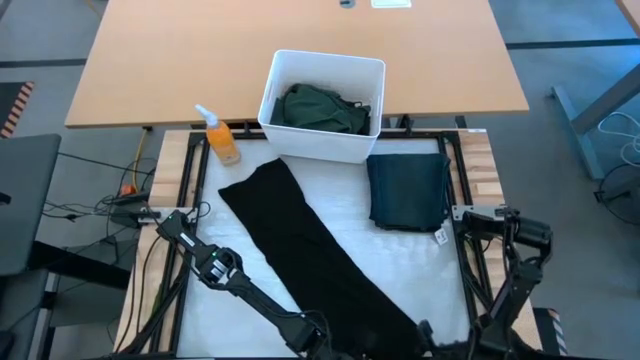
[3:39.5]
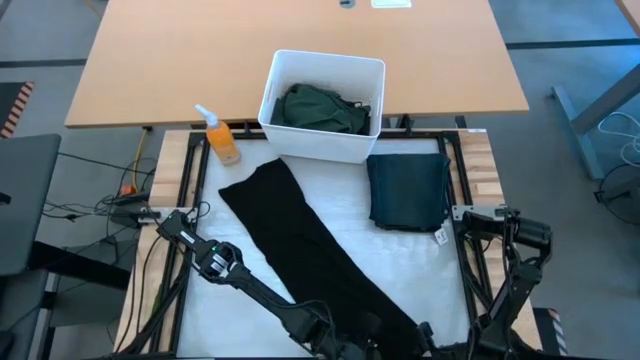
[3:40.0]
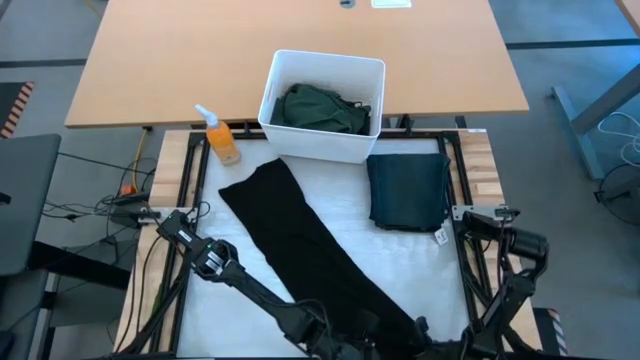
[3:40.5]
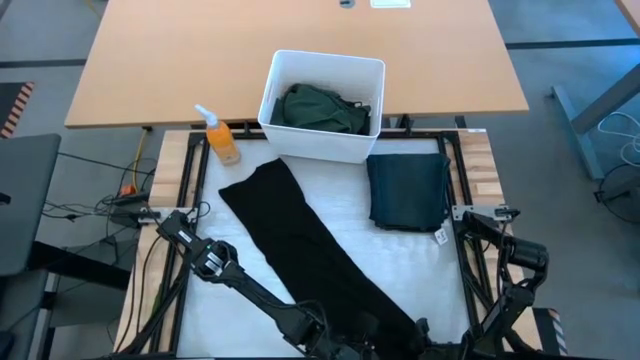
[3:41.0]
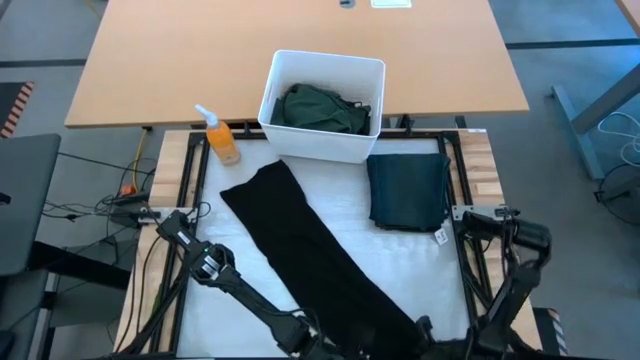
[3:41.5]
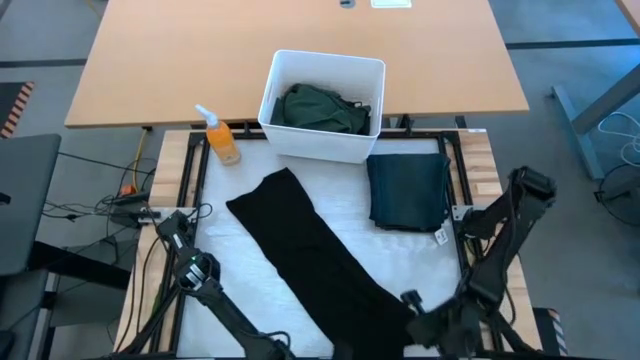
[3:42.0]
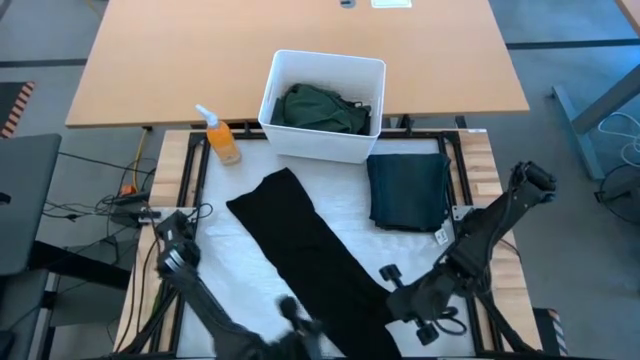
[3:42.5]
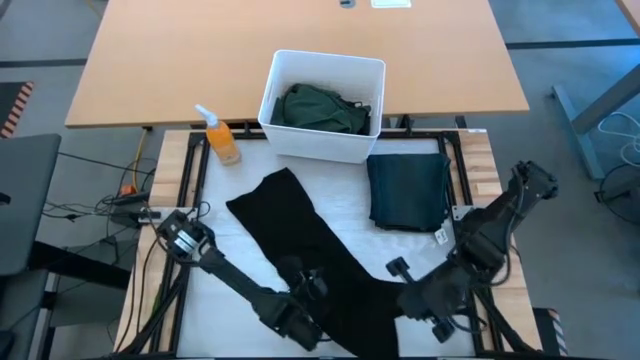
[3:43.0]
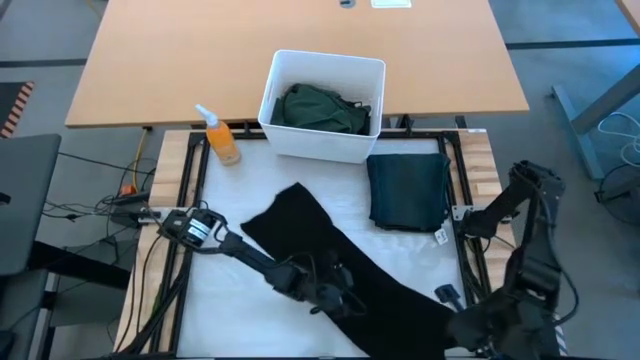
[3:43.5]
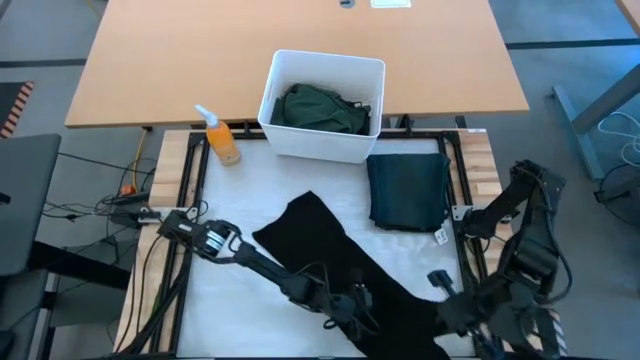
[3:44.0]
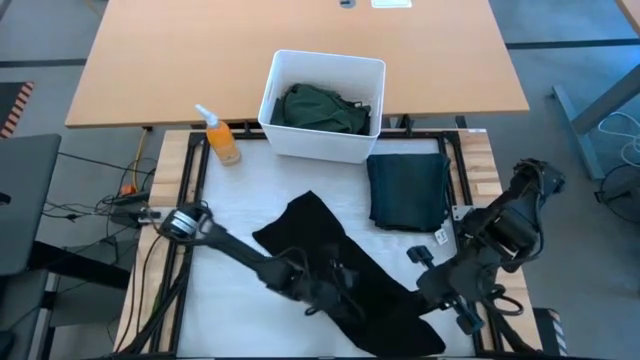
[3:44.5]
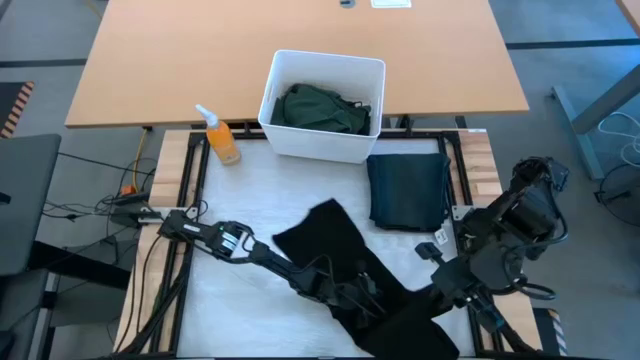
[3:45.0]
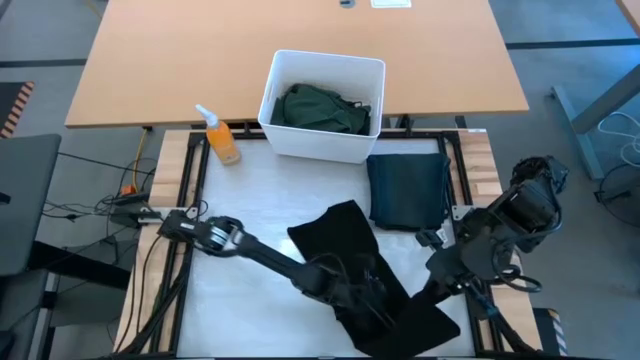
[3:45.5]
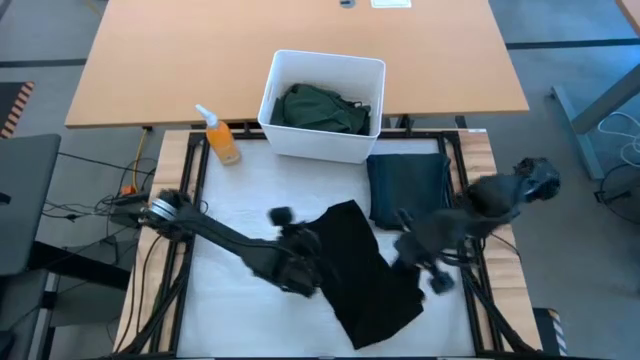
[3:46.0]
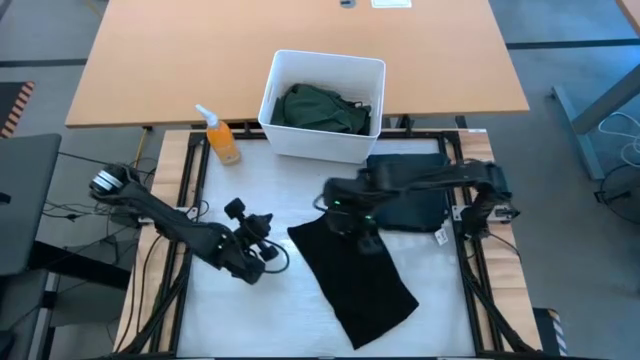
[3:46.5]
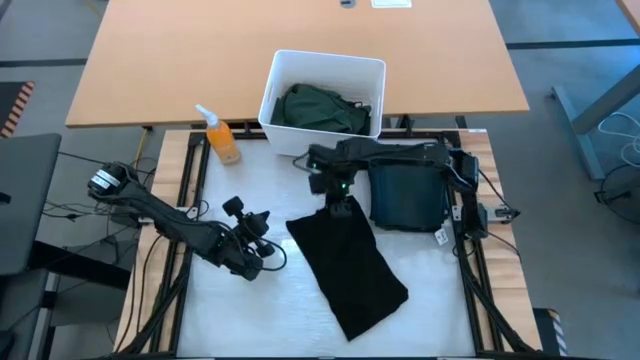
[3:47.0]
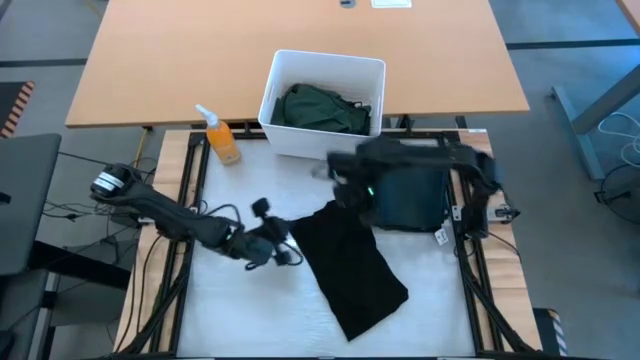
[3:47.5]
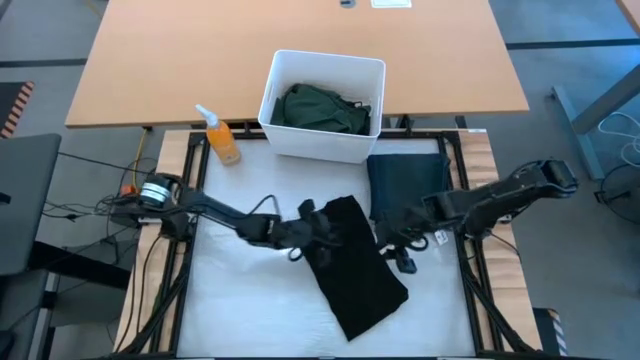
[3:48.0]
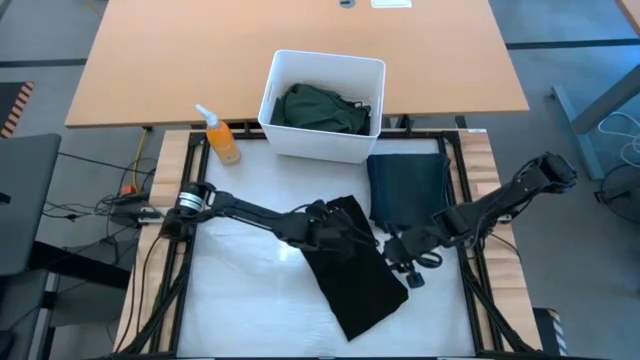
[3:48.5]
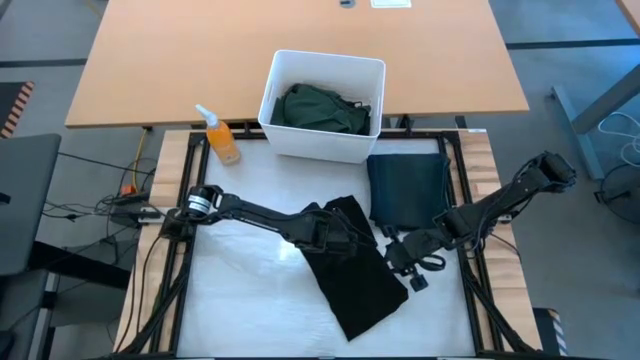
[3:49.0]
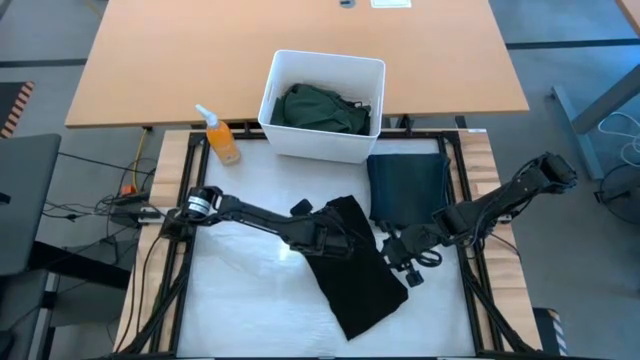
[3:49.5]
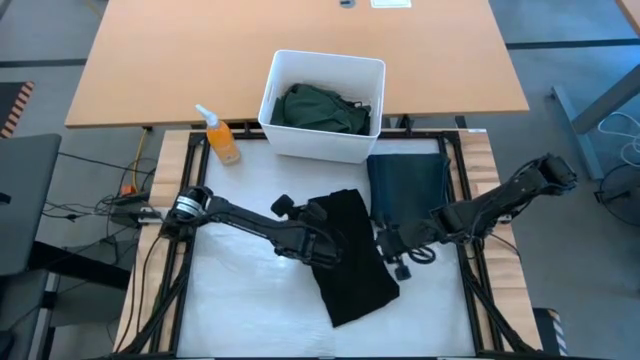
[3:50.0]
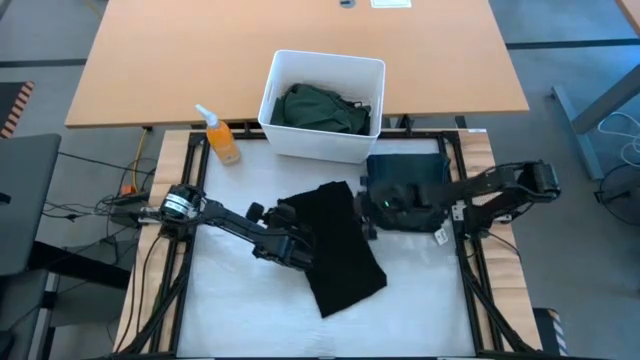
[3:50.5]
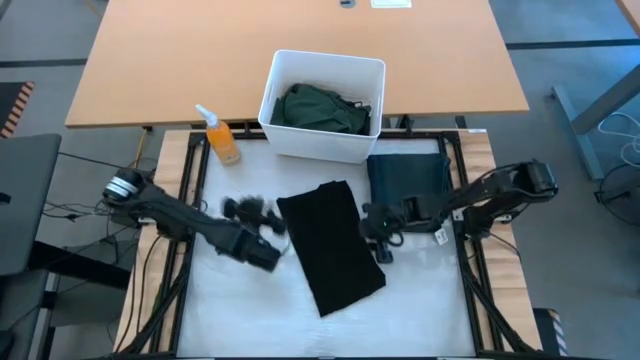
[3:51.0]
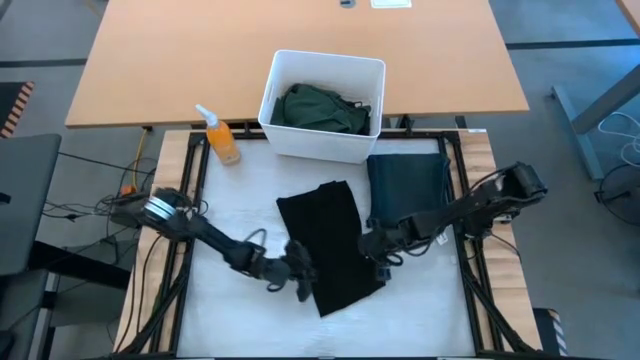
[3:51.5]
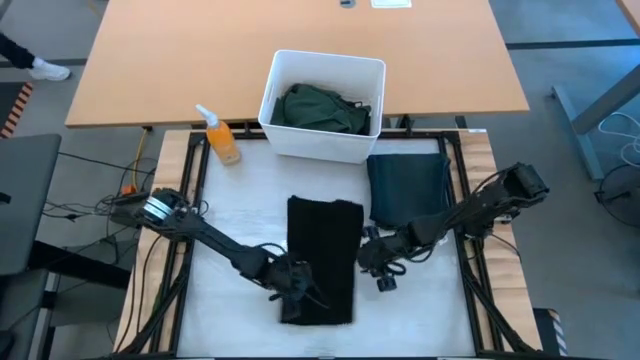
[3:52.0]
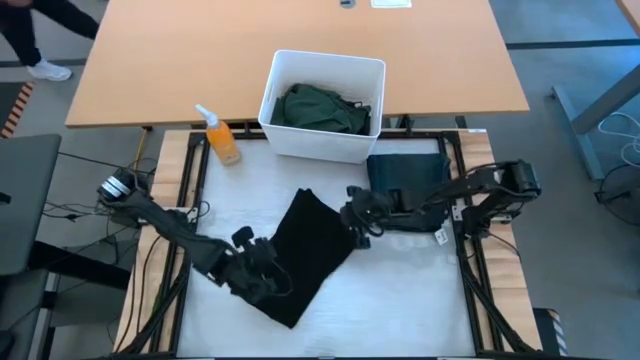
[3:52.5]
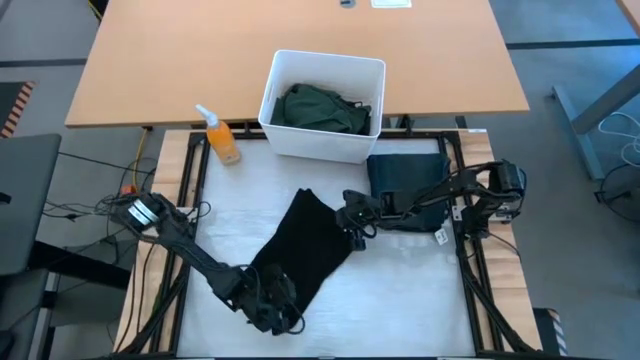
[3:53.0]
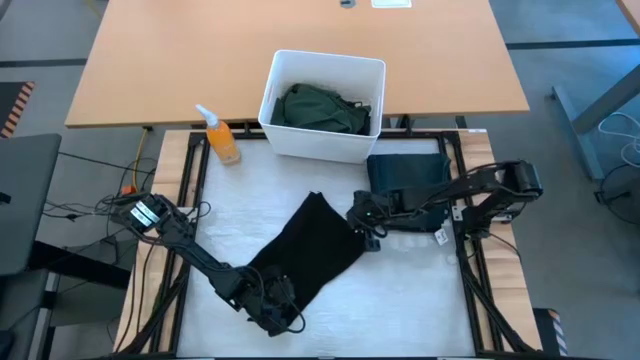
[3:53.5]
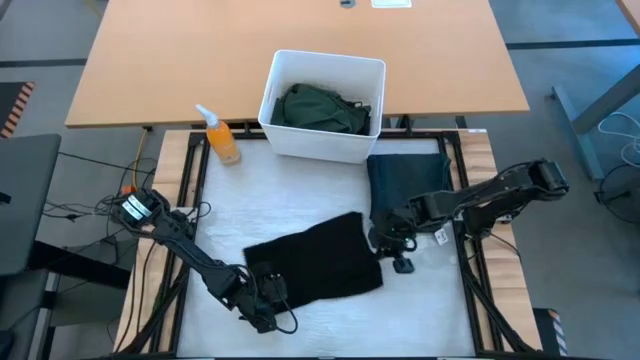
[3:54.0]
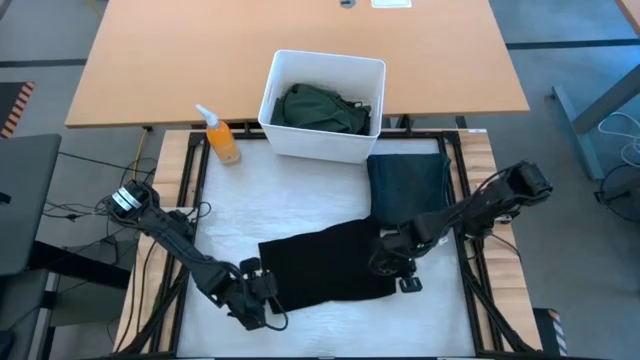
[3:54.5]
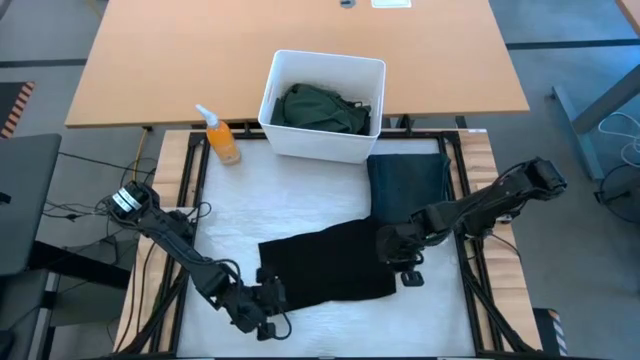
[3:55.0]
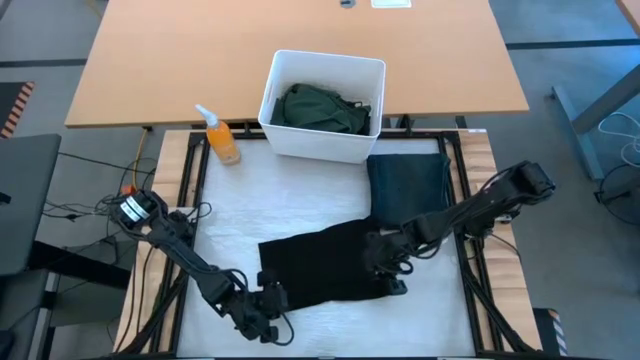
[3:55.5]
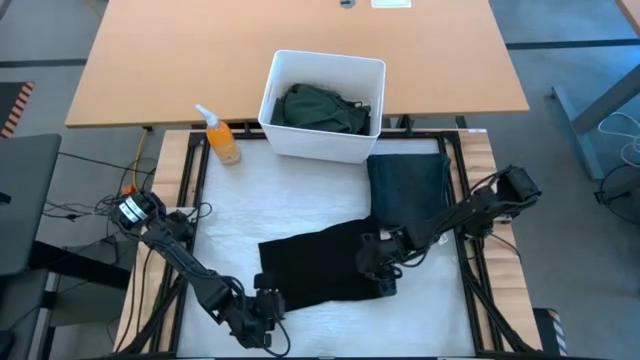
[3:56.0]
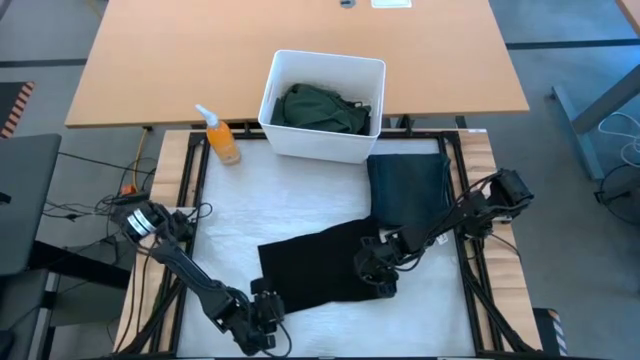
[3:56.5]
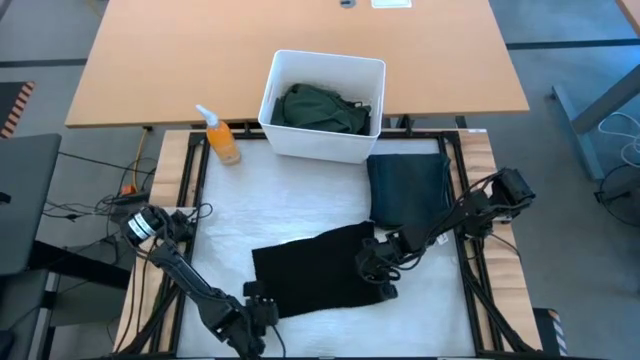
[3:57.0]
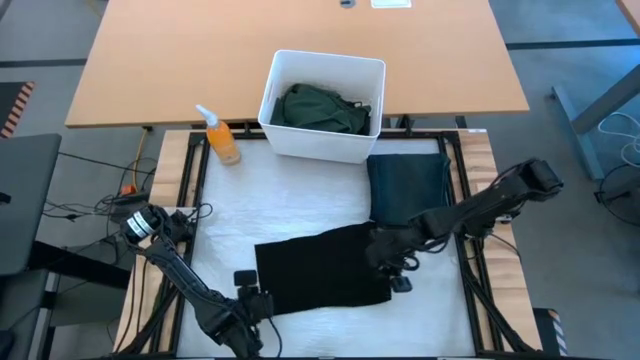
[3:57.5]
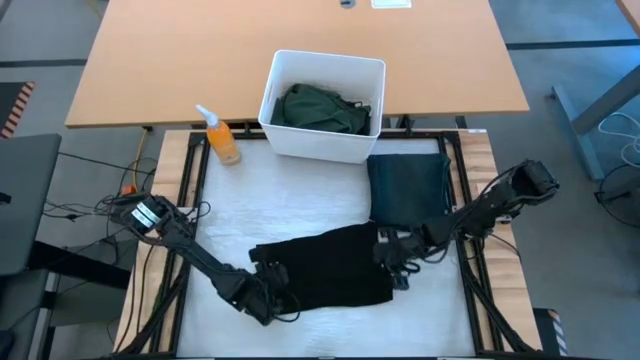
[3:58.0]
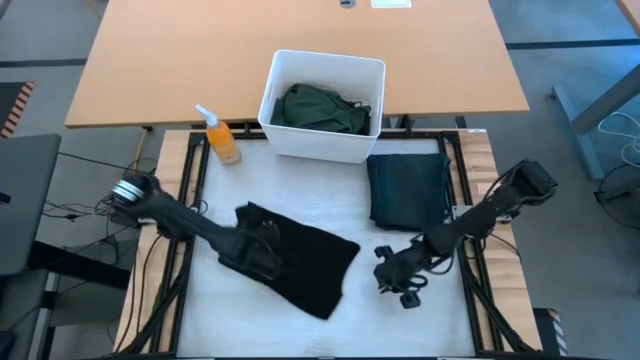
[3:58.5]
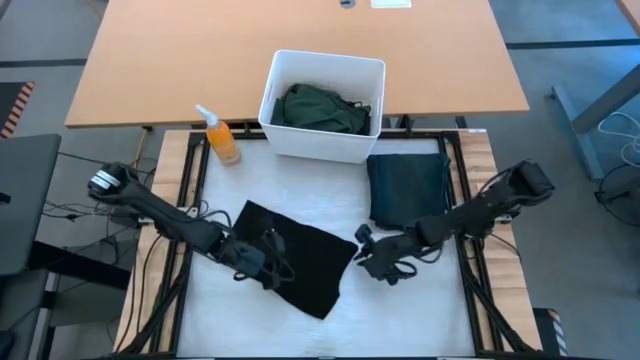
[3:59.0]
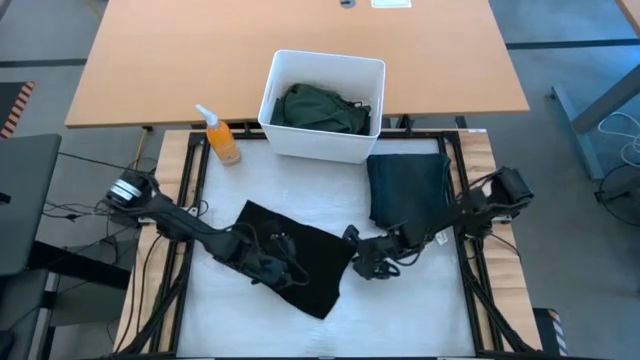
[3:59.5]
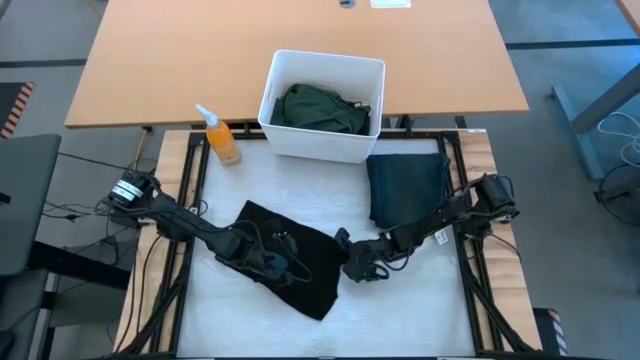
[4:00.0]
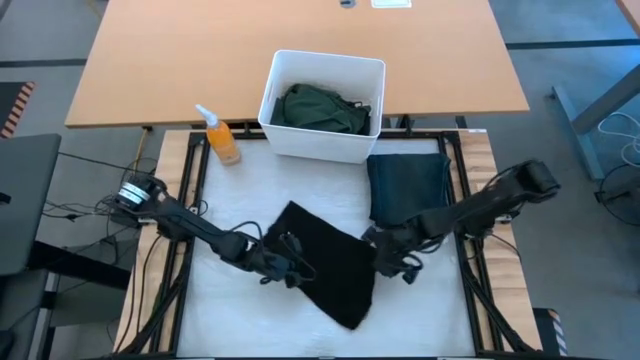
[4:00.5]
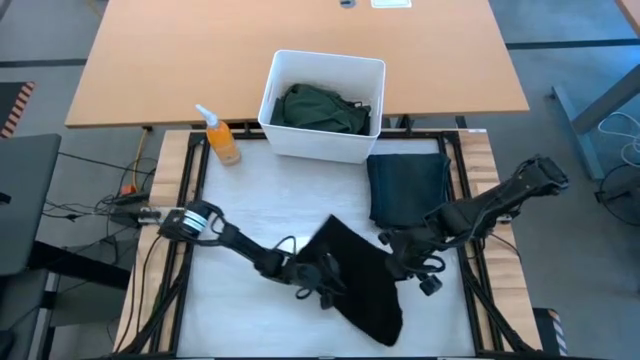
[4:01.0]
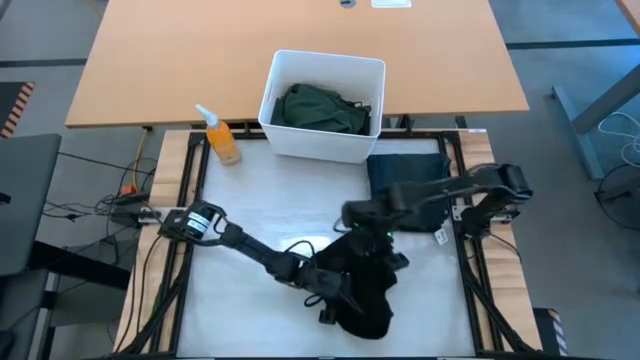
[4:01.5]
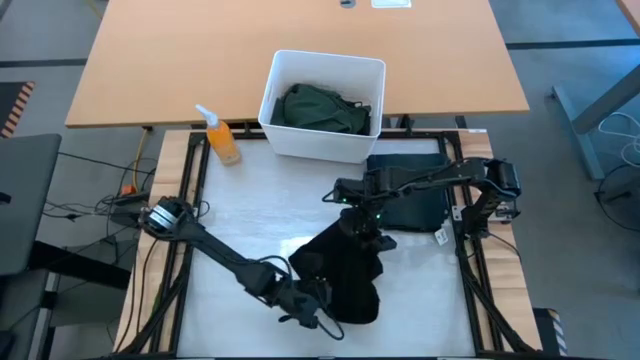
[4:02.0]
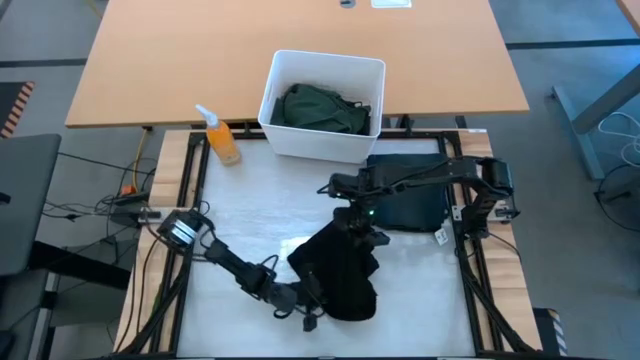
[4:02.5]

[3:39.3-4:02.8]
Task: Fold laundry
Fold the black t-shirt
